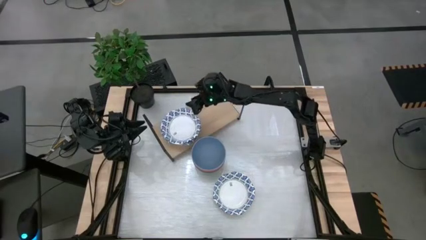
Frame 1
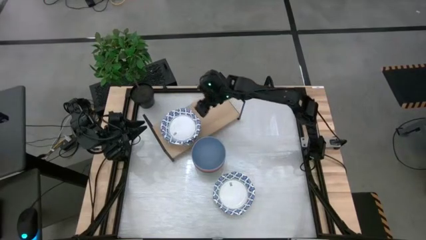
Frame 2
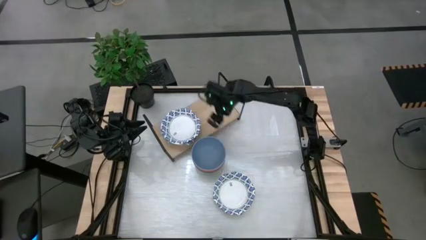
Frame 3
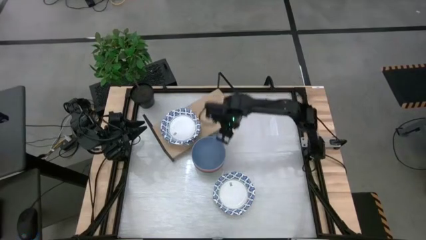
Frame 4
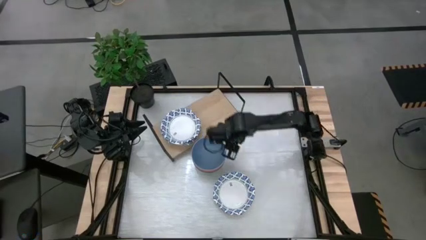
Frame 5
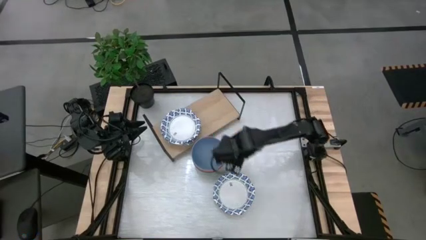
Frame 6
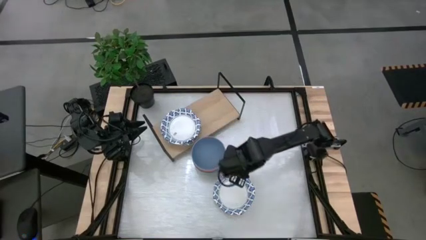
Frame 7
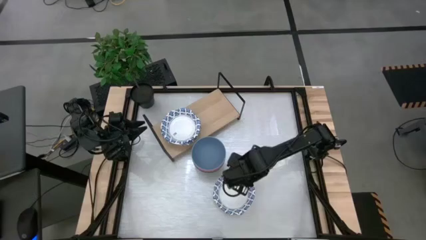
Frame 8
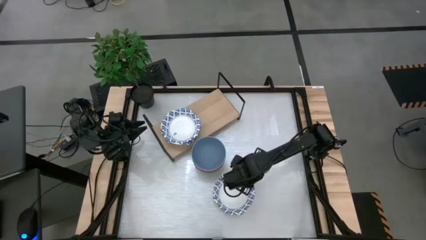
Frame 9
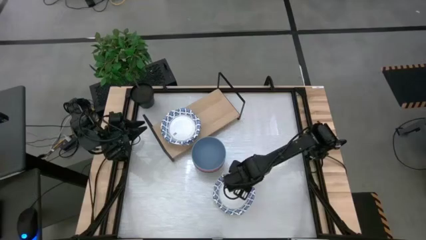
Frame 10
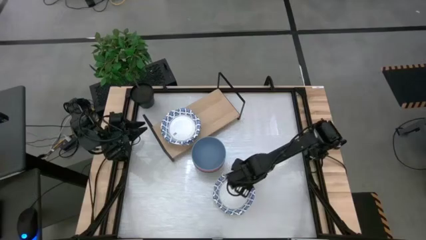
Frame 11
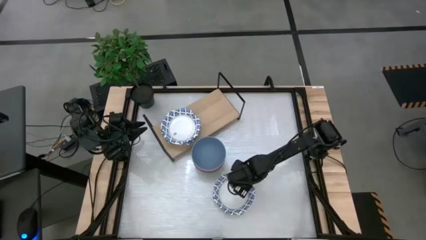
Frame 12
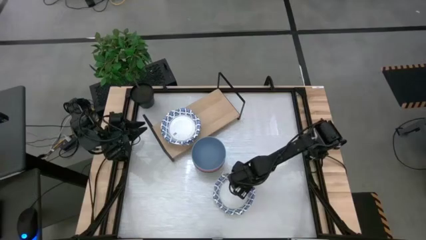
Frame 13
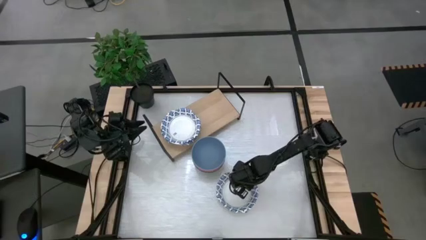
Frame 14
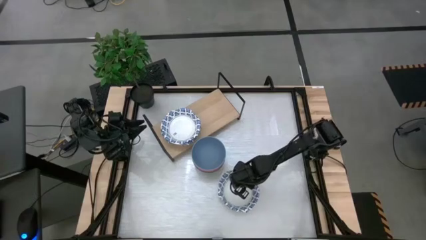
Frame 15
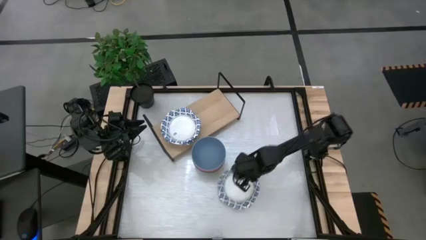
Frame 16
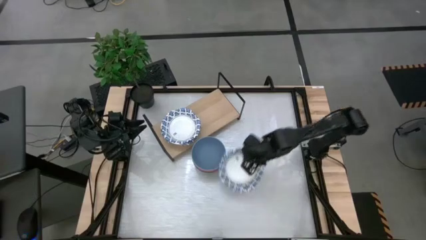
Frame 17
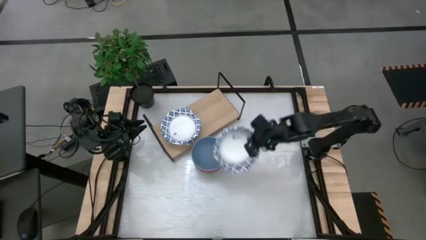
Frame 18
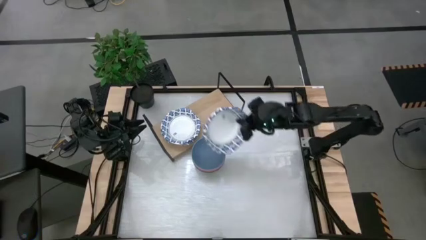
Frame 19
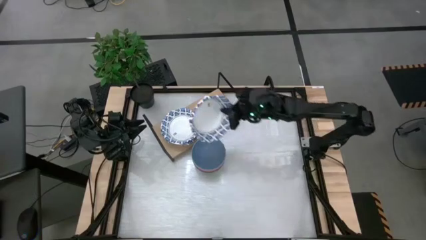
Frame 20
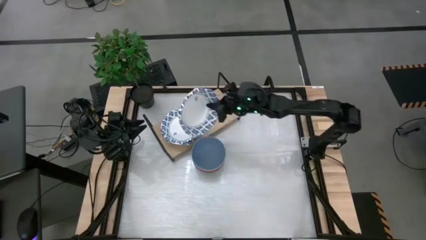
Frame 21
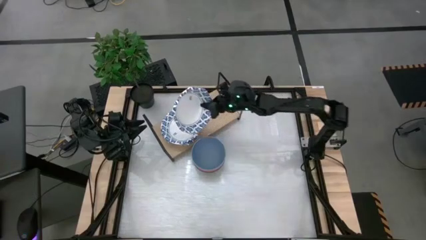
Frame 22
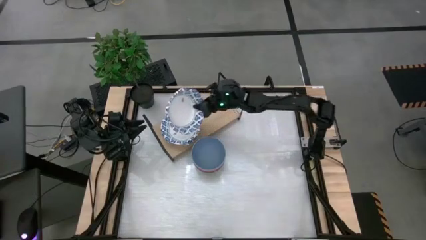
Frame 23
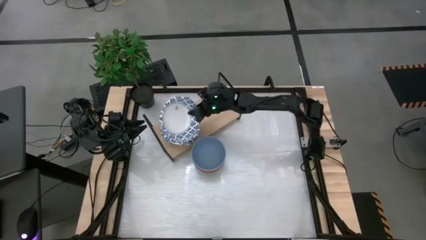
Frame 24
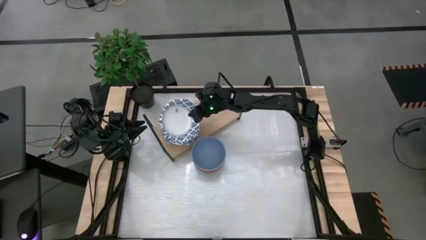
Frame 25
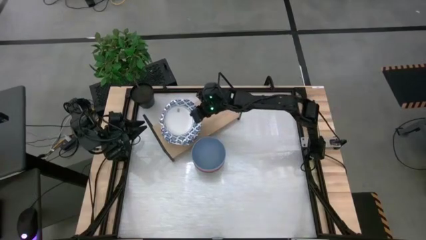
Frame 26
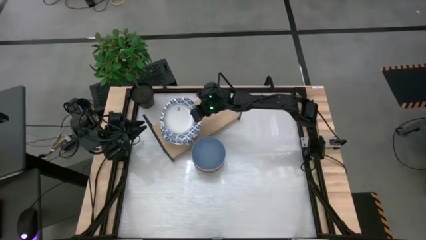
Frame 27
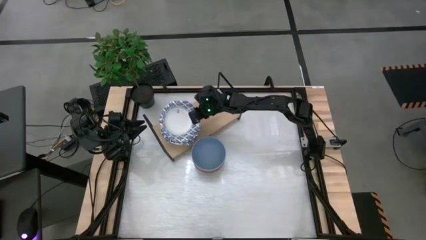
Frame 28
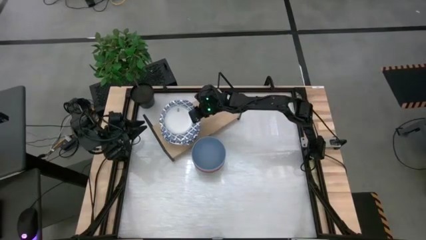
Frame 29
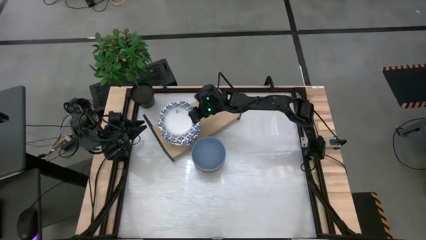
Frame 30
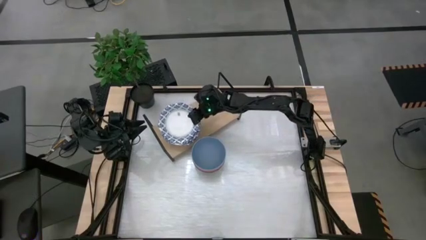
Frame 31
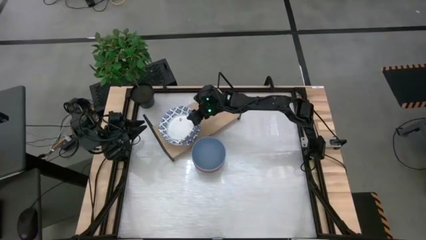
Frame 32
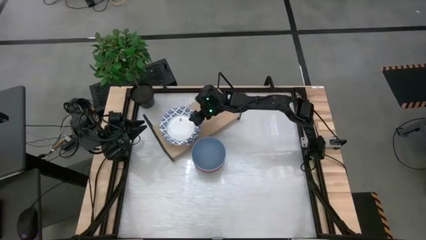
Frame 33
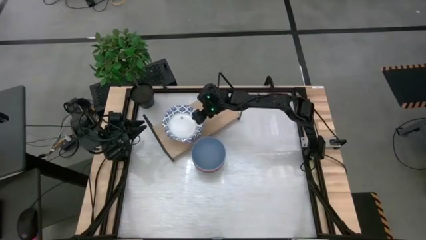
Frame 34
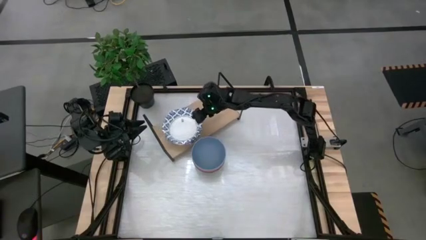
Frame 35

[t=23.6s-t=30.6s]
Task: Place and stack bowls onto a shelf
Stack the white blue patterned bowl on top of the white blue patterned bowl on the shelf

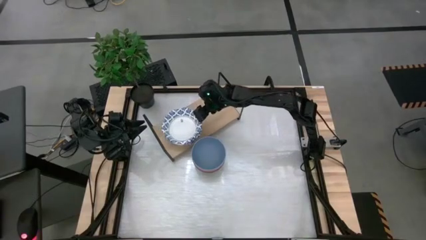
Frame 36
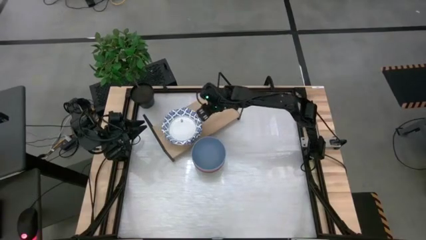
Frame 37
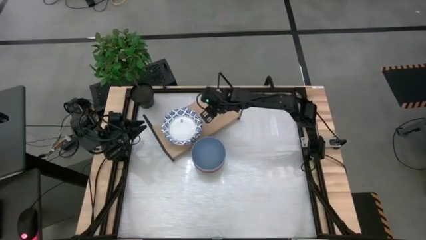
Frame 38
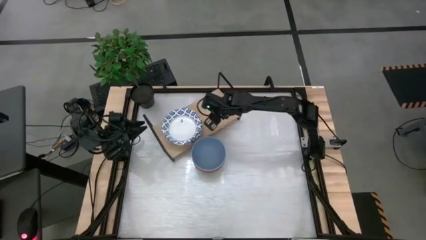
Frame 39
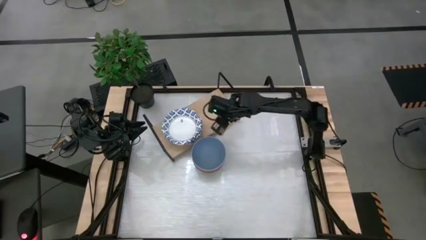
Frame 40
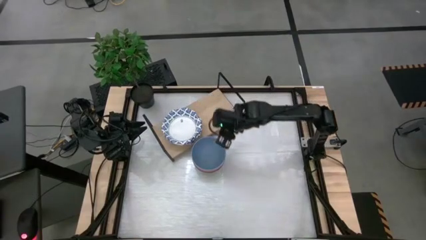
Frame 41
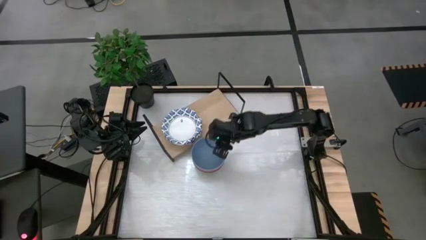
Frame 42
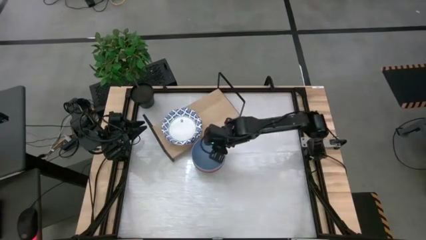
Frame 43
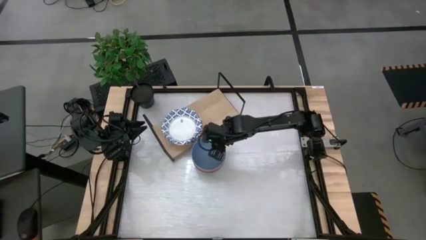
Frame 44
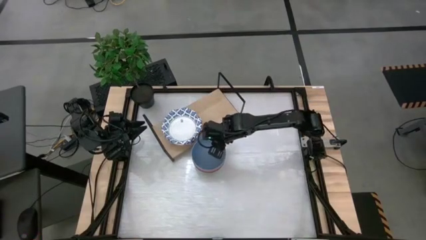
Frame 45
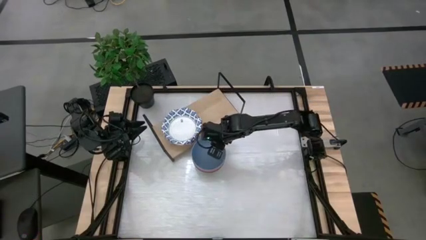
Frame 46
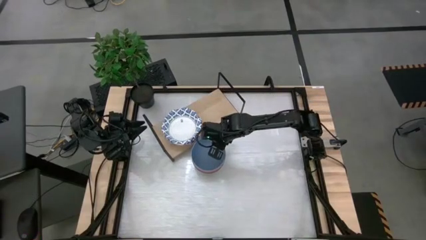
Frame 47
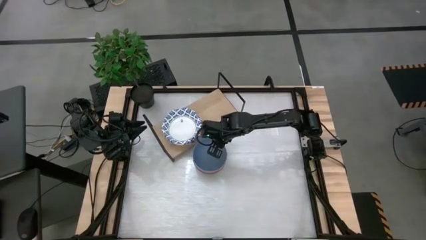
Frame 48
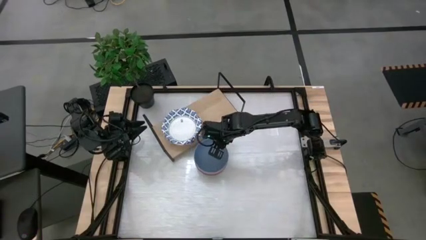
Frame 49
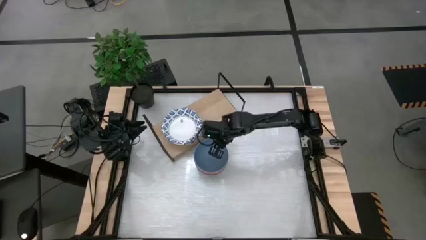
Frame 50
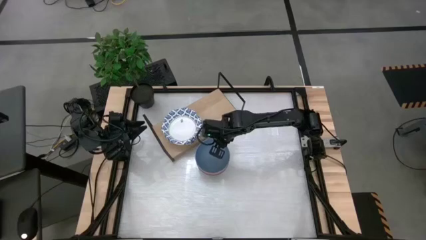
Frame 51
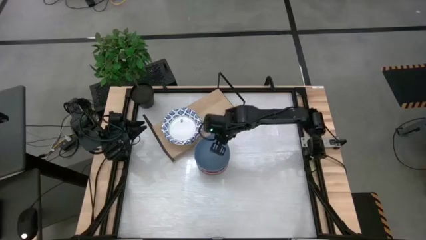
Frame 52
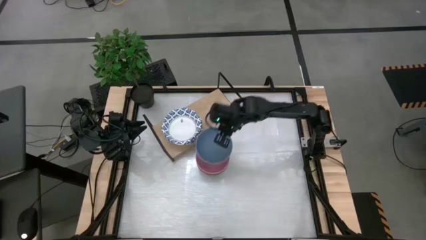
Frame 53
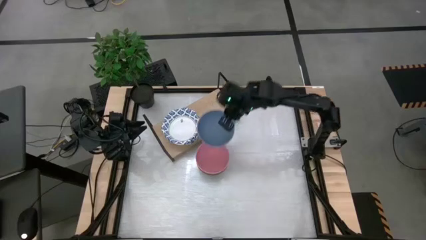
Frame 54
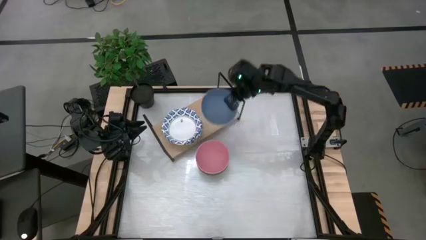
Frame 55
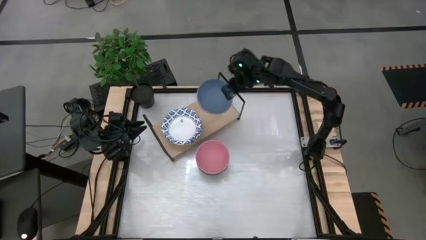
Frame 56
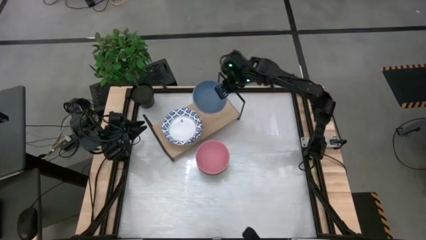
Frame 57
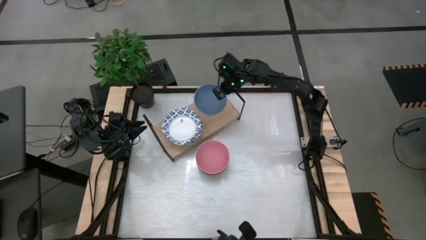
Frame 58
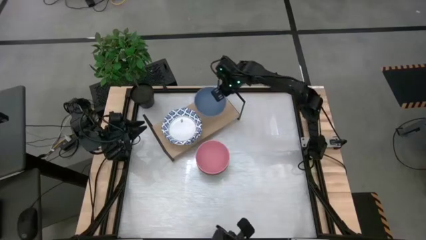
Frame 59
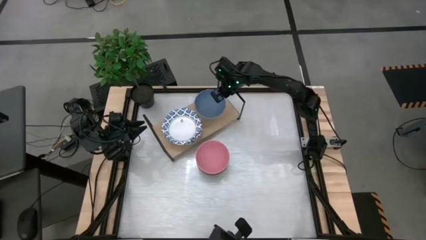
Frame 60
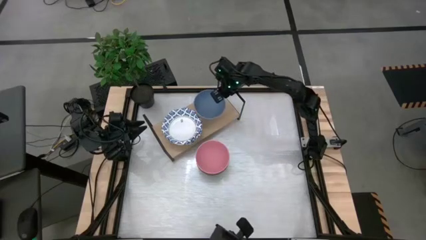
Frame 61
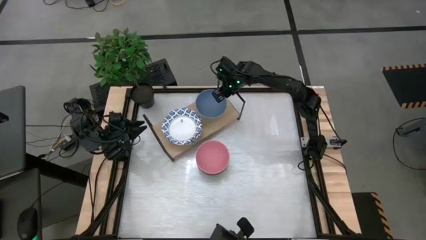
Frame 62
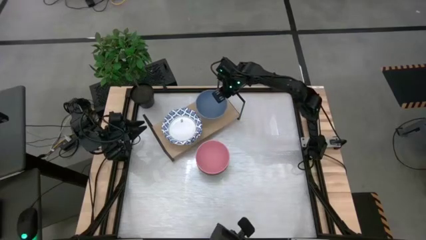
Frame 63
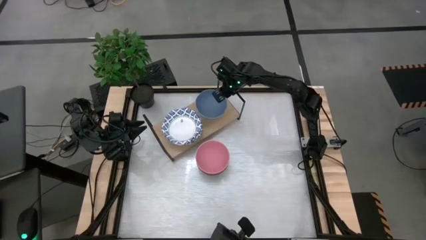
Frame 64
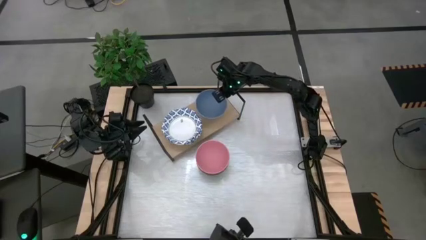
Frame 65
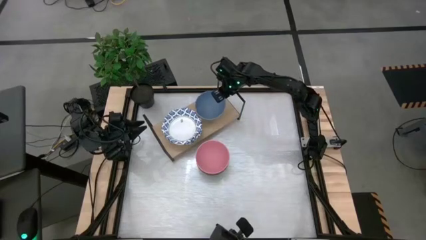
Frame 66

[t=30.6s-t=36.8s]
Put the blue bowl on the shelf
